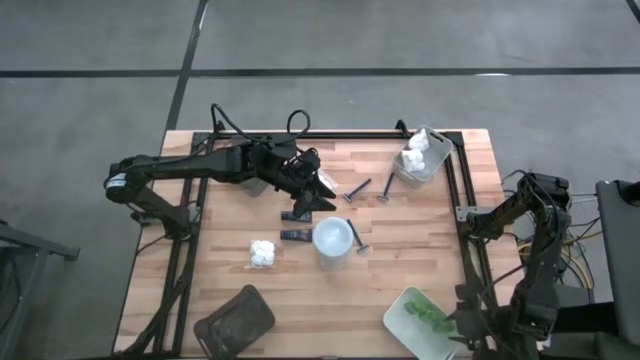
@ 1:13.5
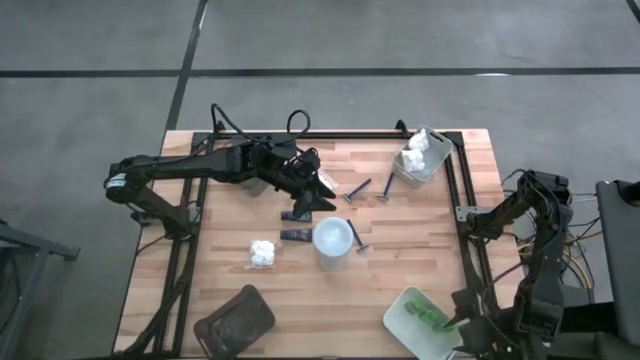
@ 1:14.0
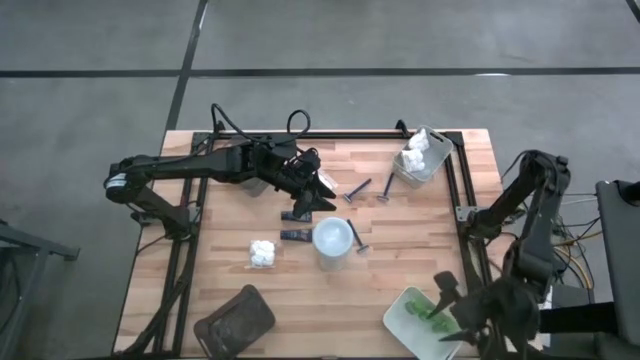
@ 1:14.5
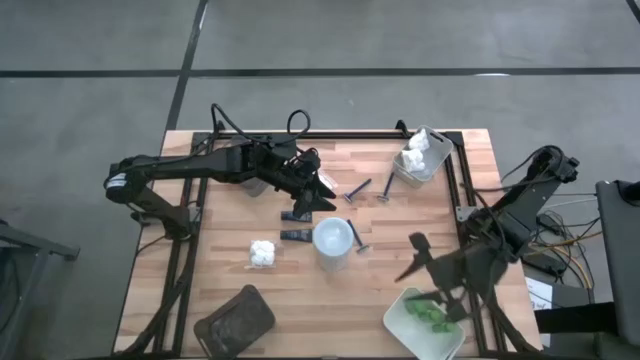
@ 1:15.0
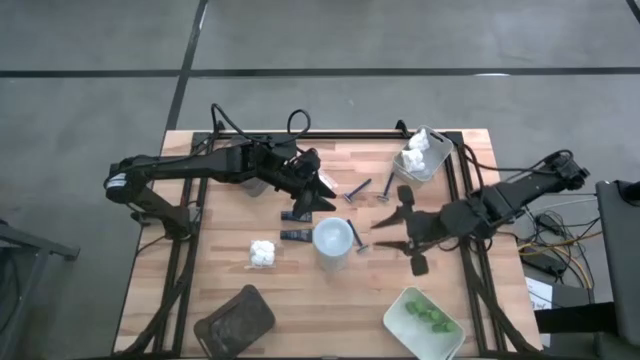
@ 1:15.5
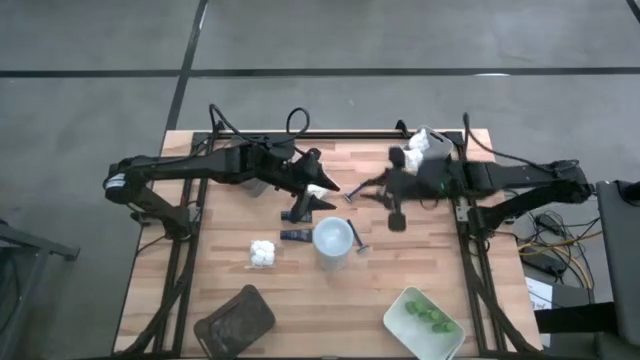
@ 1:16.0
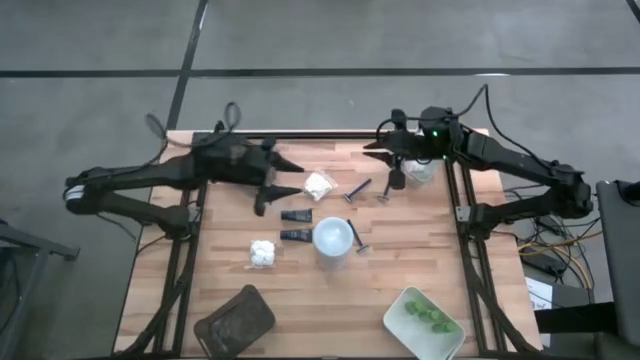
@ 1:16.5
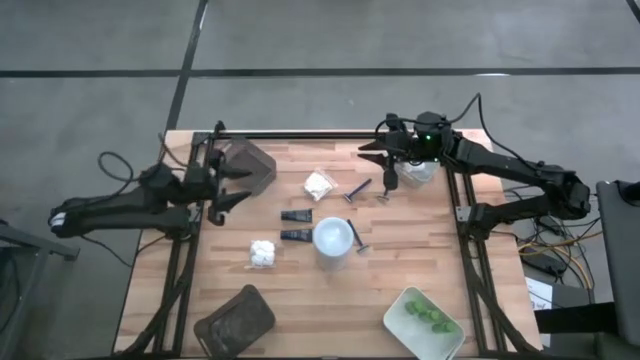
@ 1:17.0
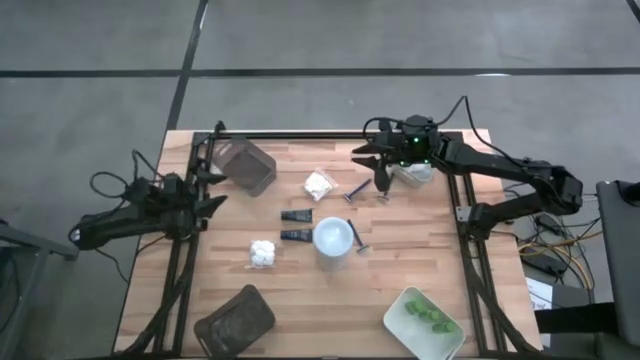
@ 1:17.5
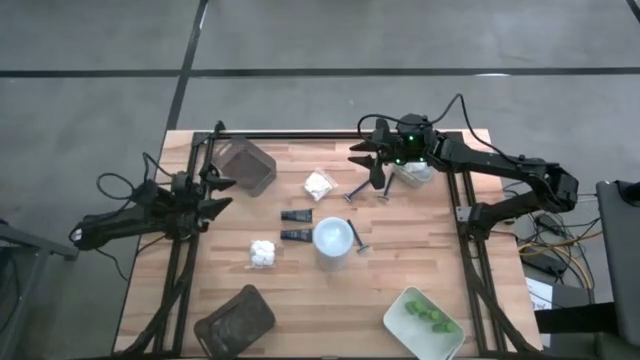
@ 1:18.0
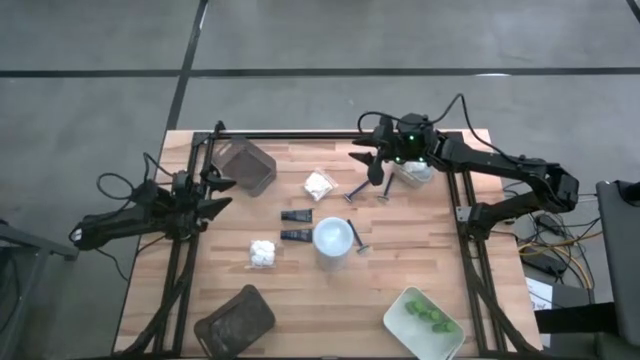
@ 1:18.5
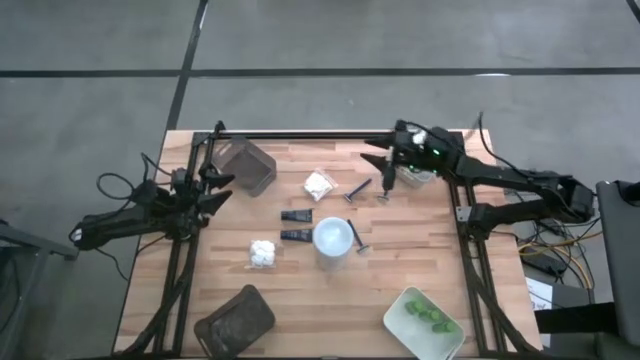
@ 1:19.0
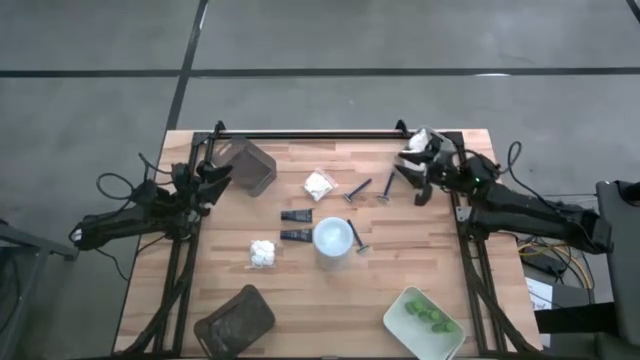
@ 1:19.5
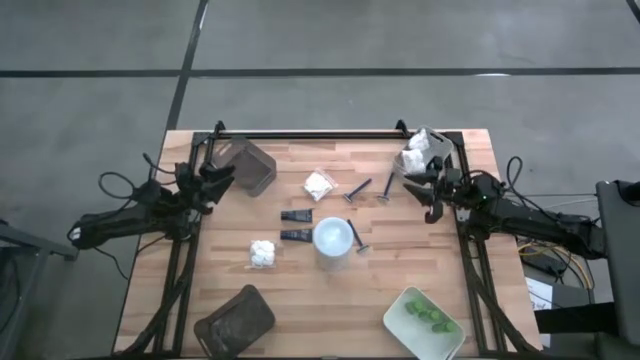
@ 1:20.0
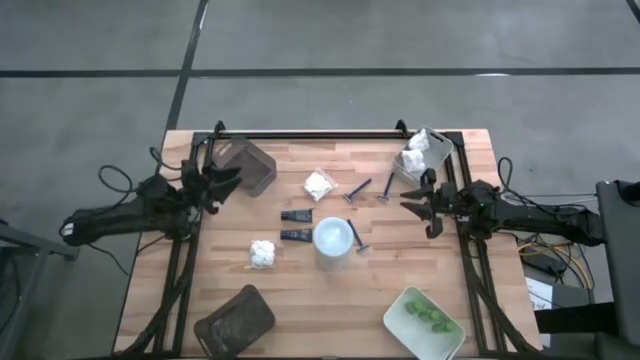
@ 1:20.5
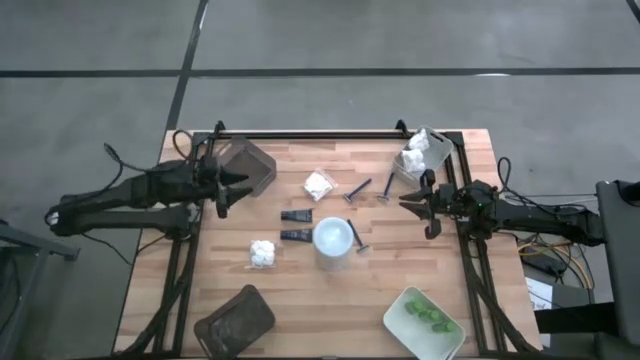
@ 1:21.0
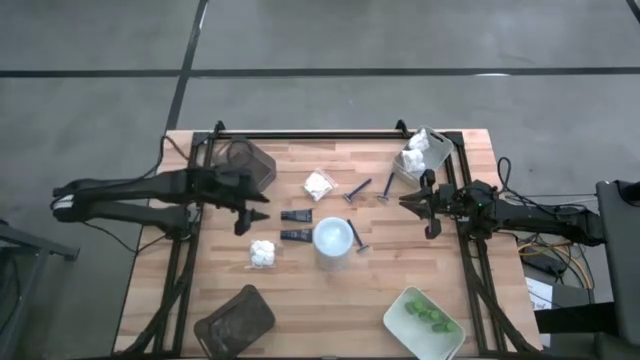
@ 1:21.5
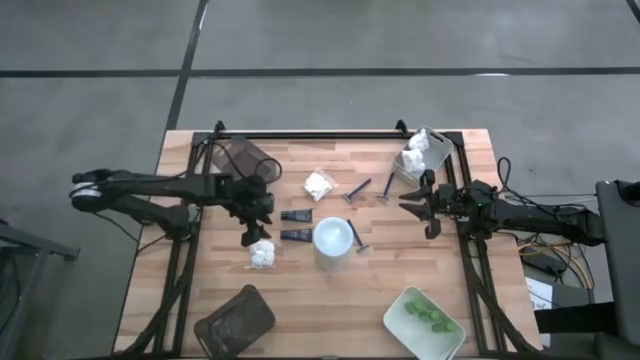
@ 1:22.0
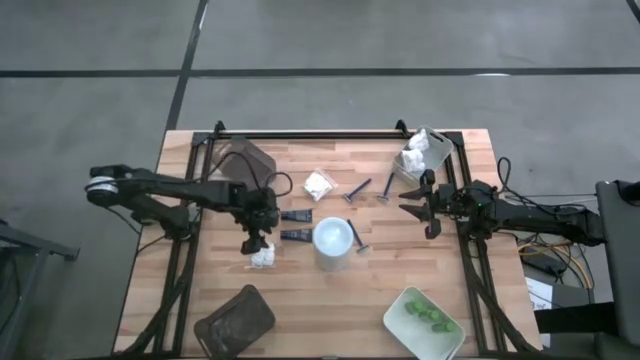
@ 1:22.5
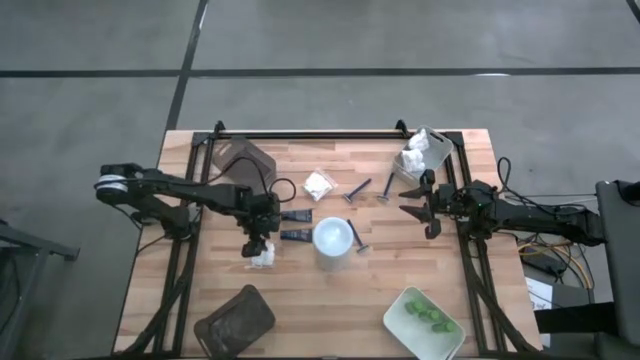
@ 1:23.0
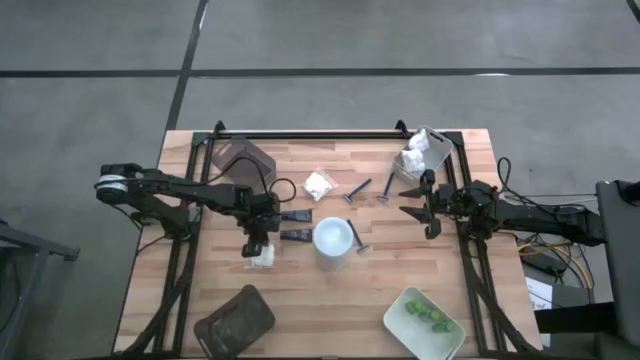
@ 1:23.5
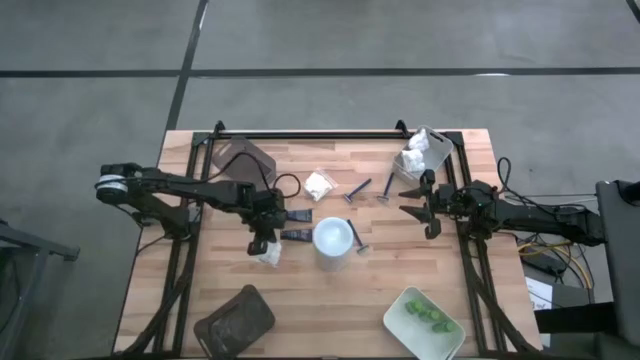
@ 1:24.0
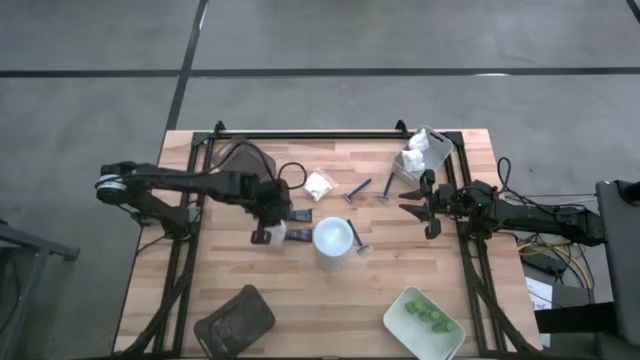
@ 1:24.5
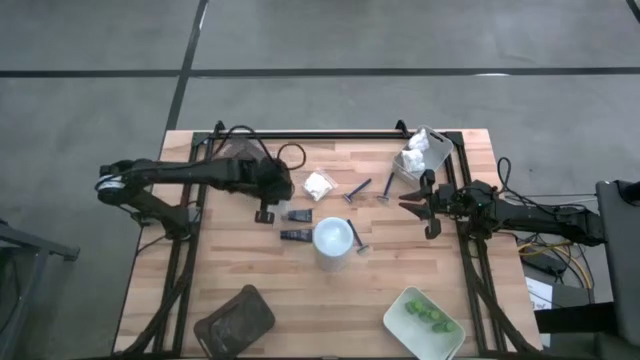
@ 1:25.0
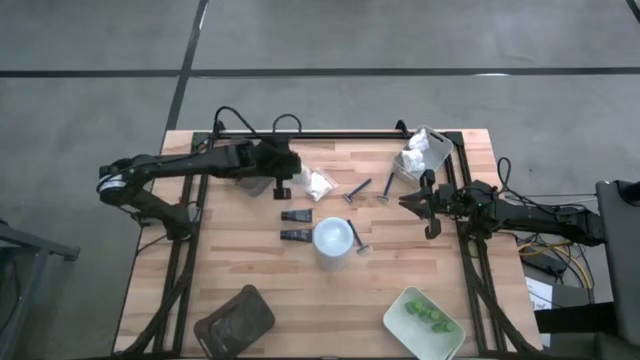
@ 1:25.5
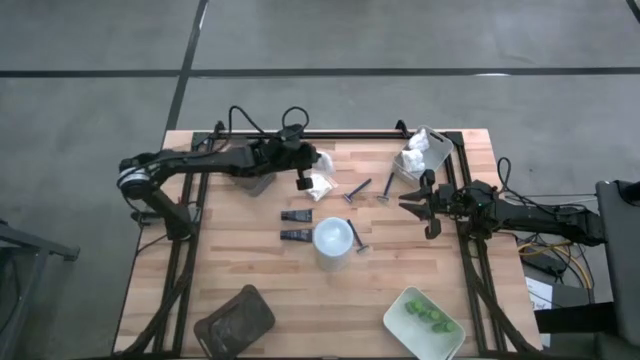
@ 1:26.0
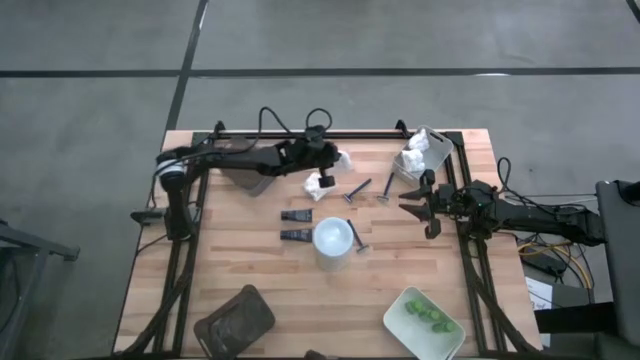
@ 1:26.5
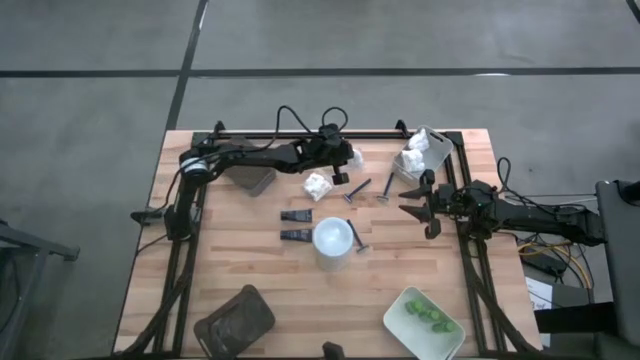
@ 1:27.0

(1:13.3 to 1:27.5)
Task: Pick & Place Travel size toiletries
Move the white cotton pack to the top middle of the table

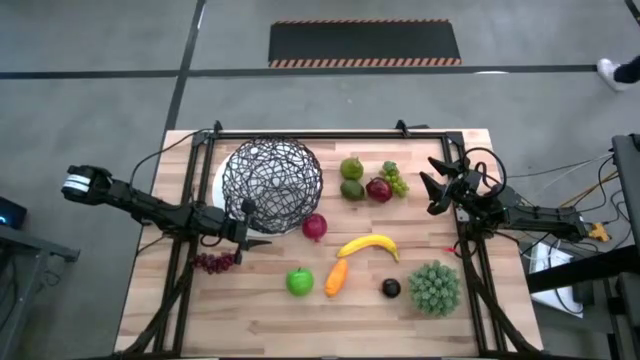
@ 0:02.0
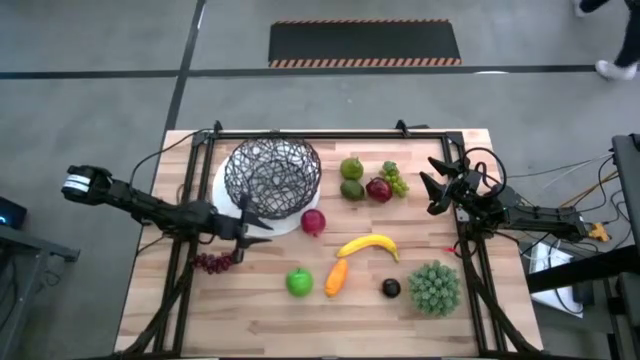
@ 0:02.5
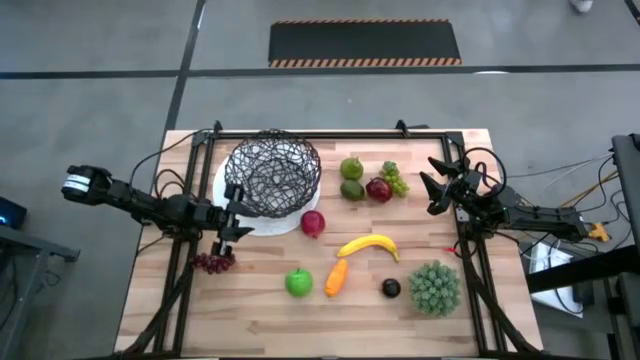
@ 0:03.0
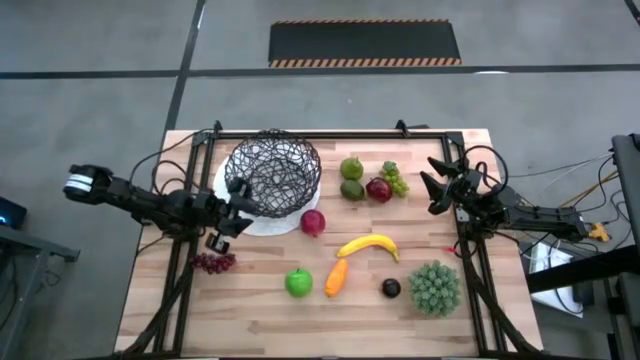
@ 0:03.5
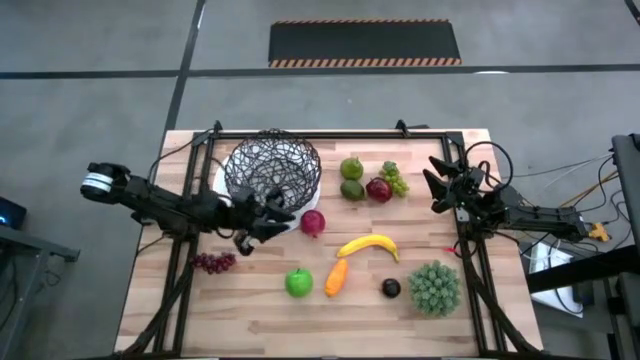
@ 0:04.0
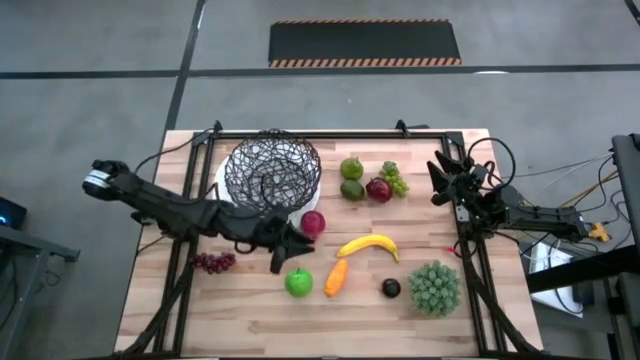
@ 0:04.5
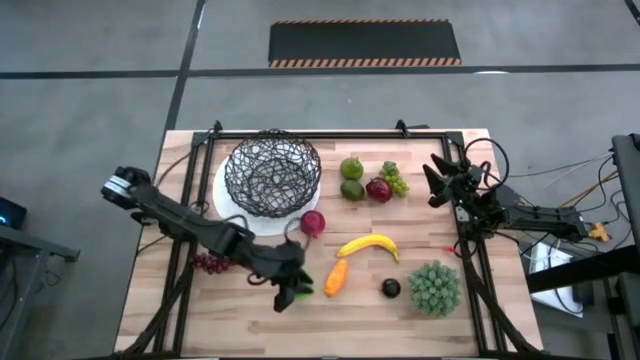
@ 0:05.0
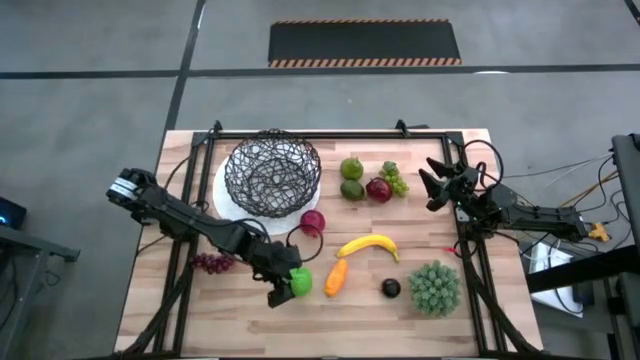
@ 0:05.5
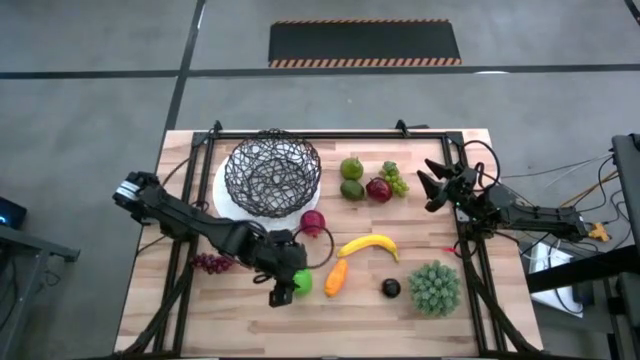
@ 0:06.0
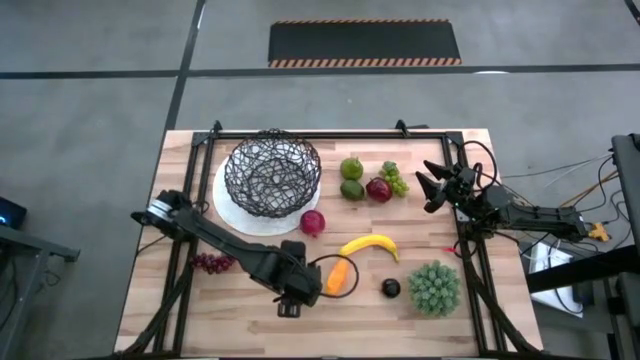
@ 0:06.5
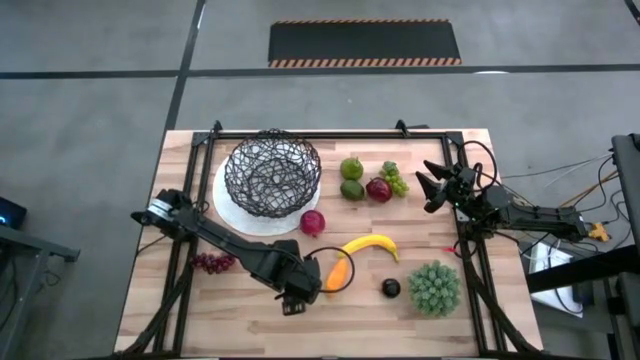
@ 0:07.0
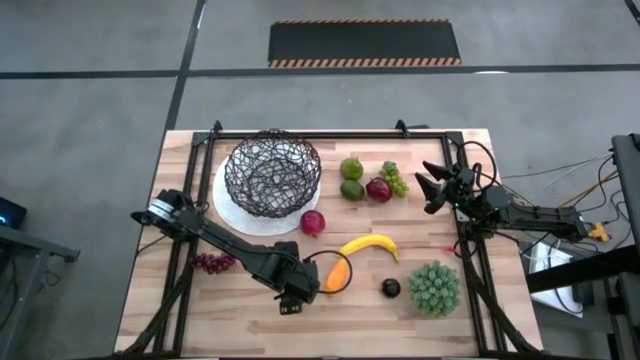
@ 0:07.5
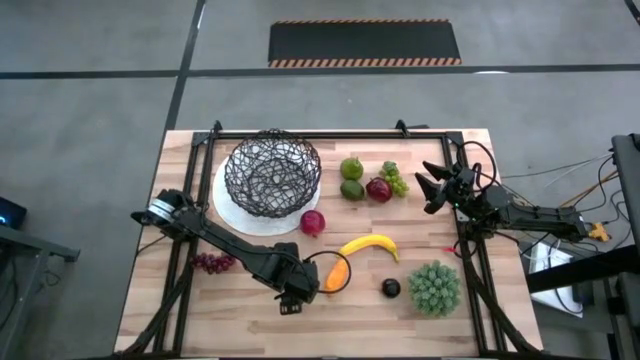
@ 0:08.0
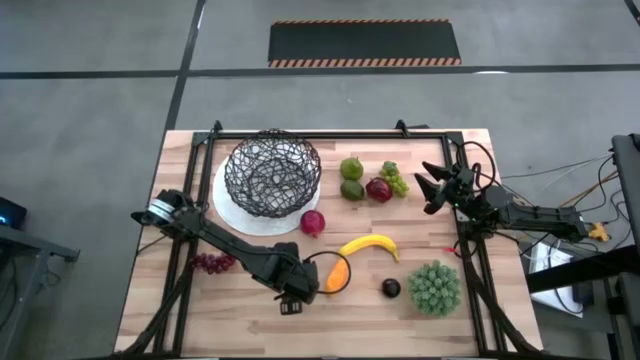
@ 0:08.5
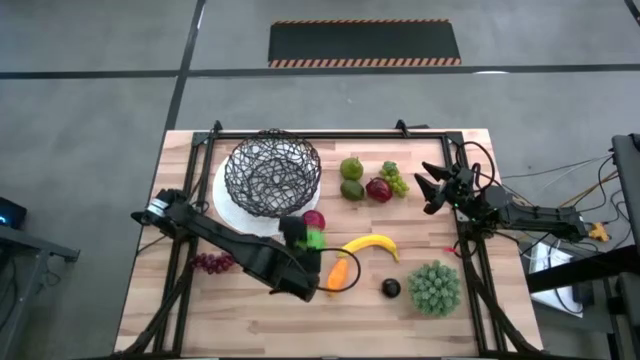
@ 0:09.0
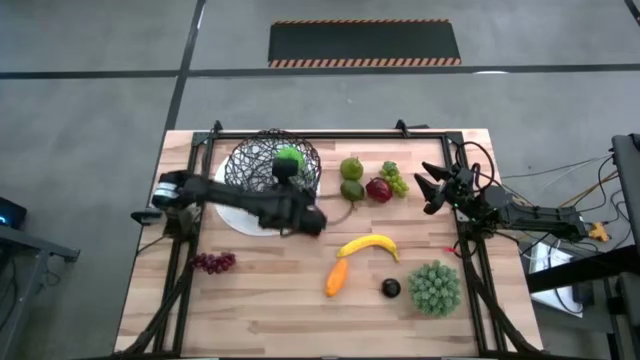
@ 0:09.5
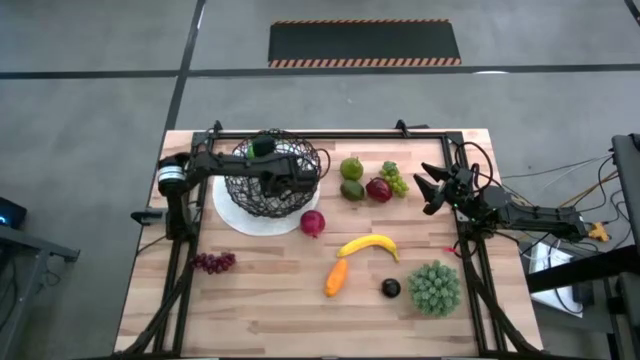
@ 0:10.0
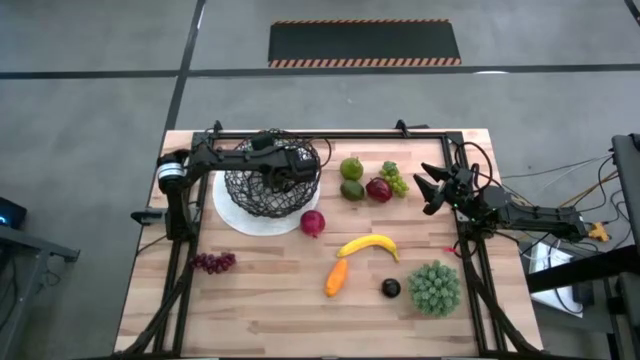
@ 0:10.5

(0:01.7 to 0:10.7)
Task: Build produce basket
Put the green apple into the woven basket
